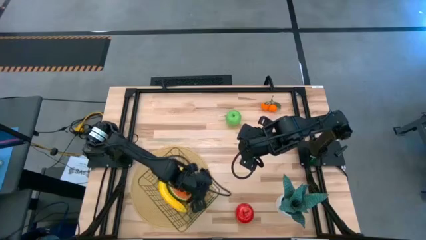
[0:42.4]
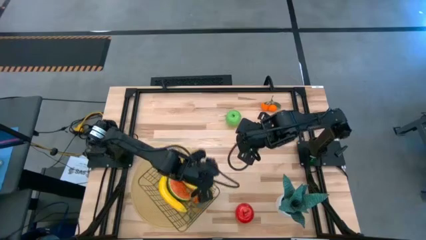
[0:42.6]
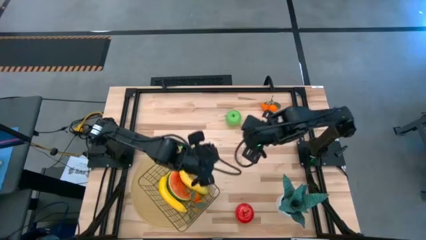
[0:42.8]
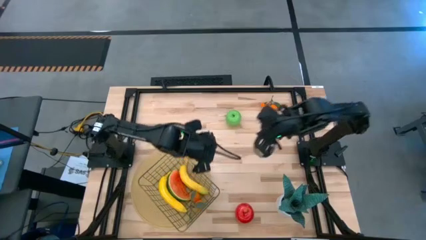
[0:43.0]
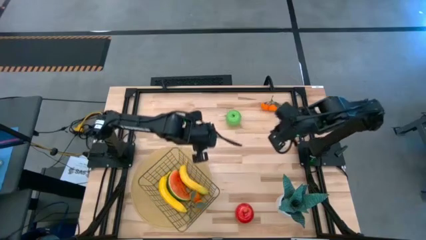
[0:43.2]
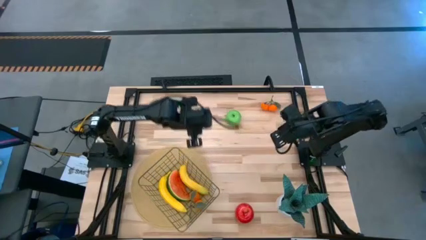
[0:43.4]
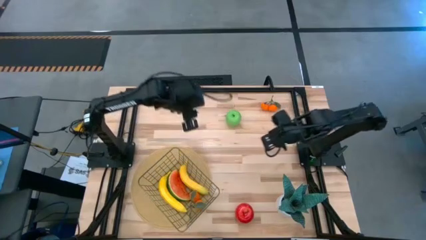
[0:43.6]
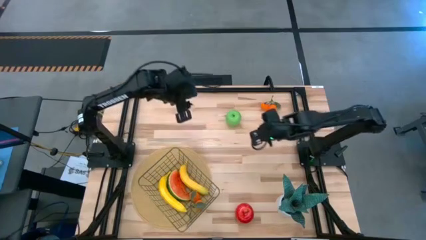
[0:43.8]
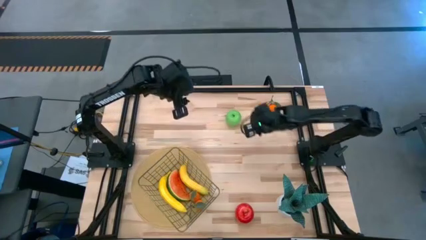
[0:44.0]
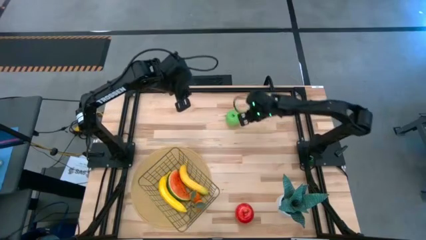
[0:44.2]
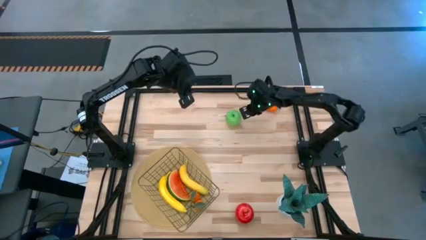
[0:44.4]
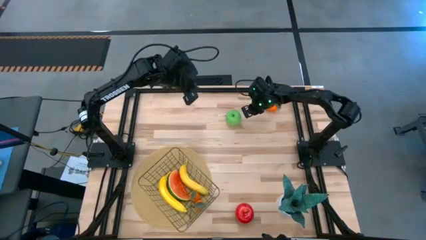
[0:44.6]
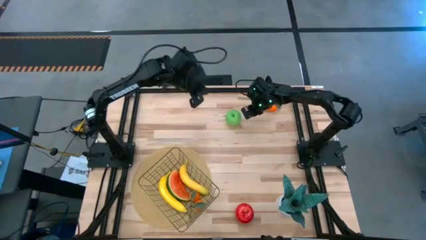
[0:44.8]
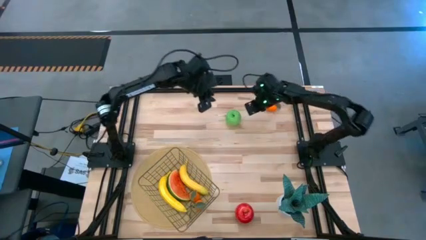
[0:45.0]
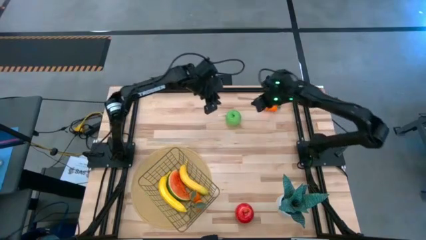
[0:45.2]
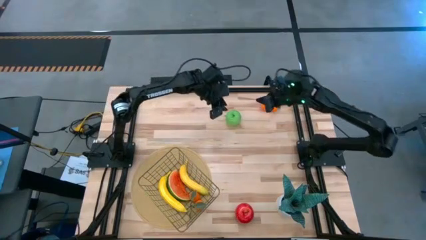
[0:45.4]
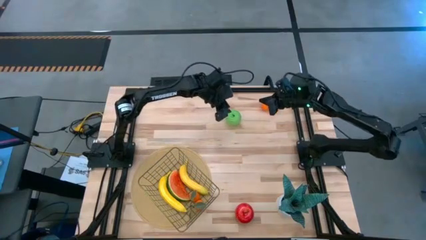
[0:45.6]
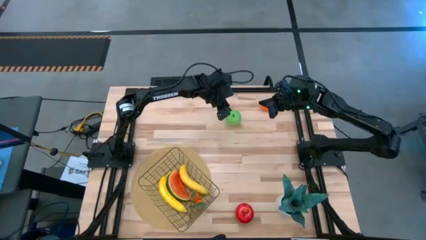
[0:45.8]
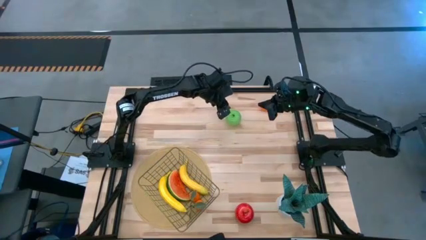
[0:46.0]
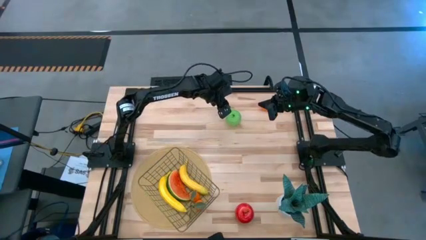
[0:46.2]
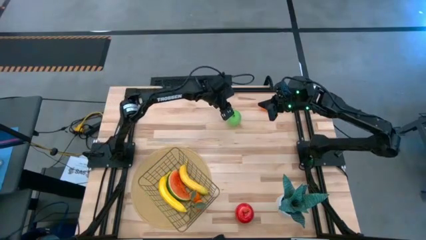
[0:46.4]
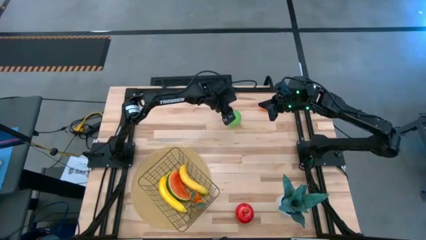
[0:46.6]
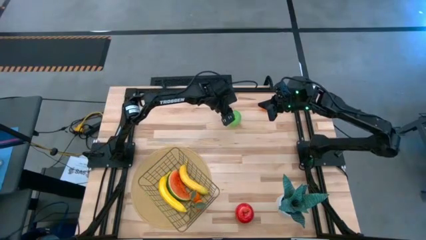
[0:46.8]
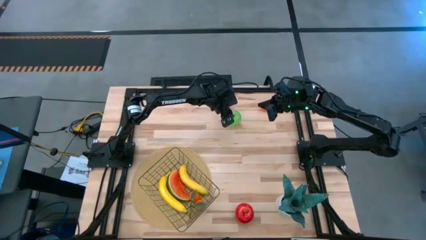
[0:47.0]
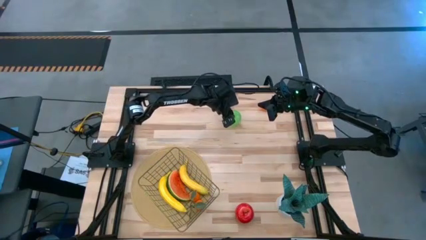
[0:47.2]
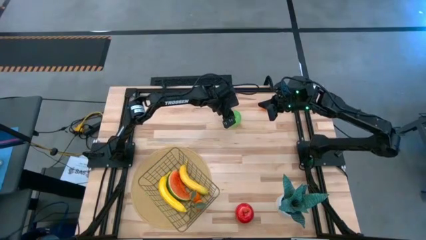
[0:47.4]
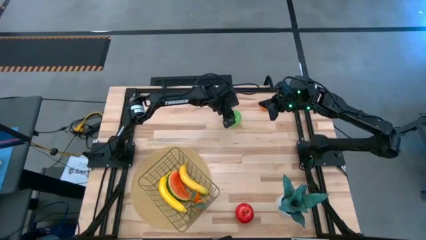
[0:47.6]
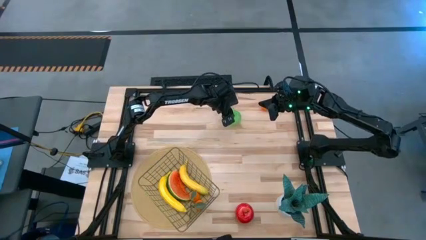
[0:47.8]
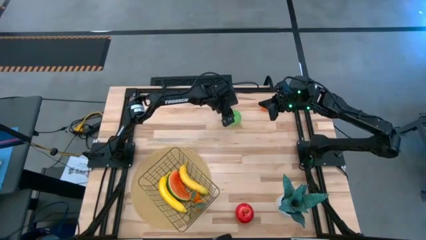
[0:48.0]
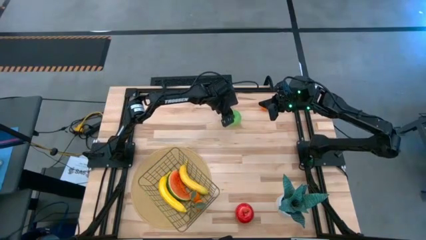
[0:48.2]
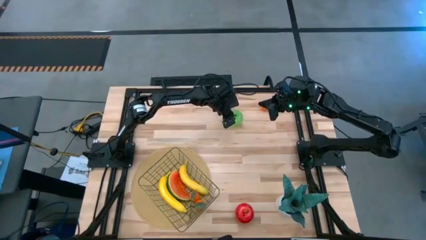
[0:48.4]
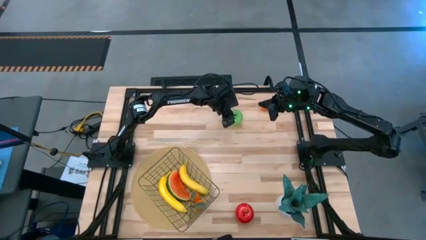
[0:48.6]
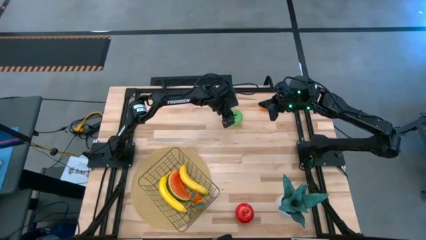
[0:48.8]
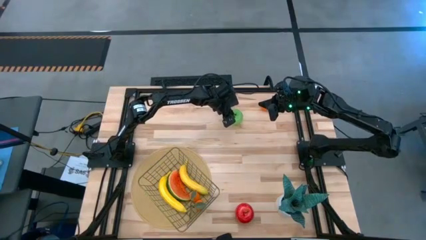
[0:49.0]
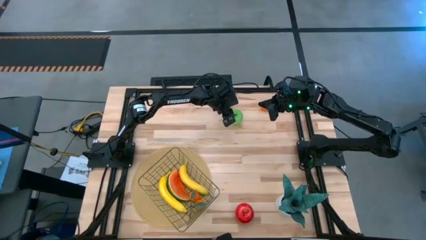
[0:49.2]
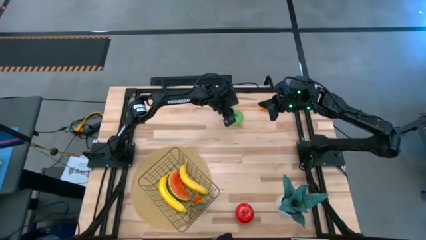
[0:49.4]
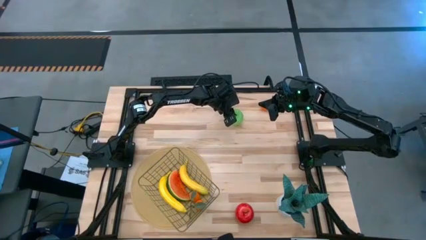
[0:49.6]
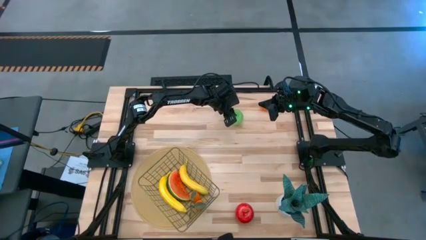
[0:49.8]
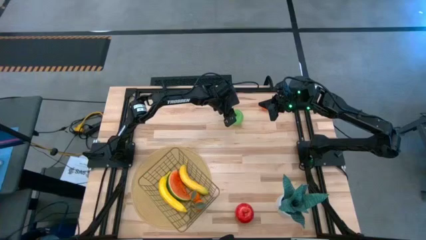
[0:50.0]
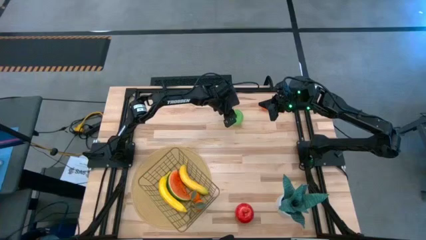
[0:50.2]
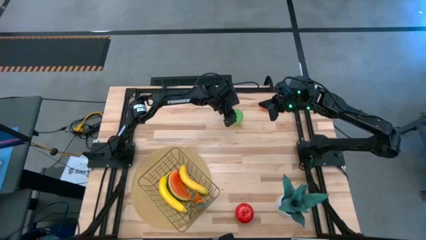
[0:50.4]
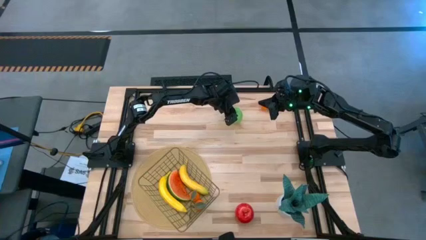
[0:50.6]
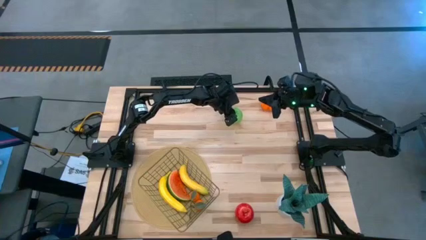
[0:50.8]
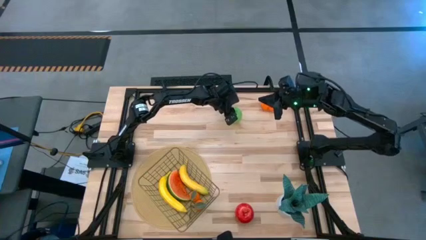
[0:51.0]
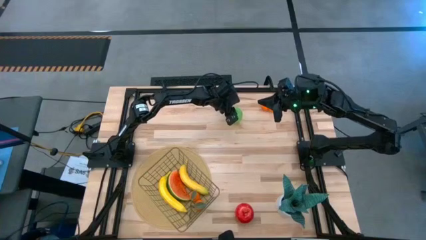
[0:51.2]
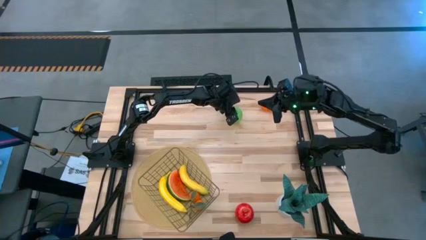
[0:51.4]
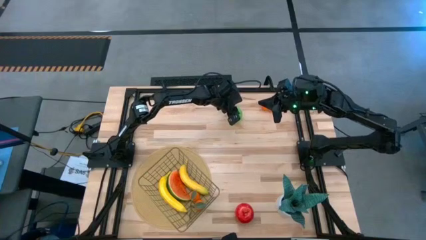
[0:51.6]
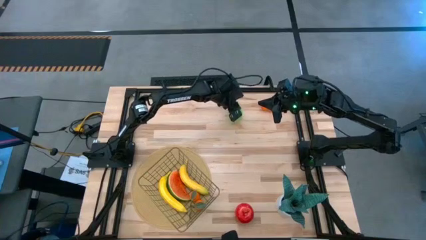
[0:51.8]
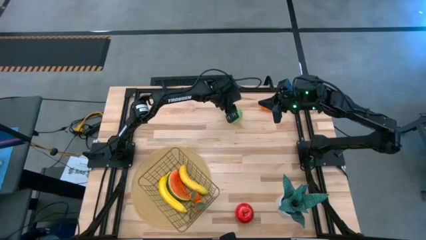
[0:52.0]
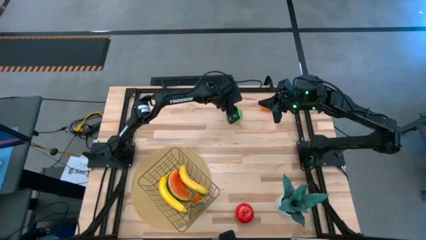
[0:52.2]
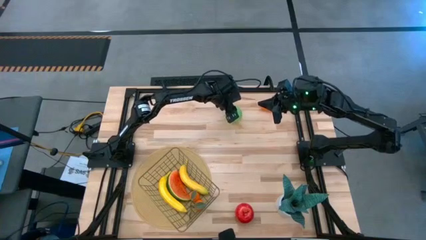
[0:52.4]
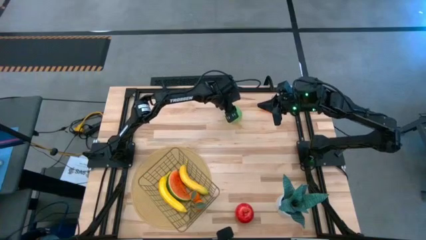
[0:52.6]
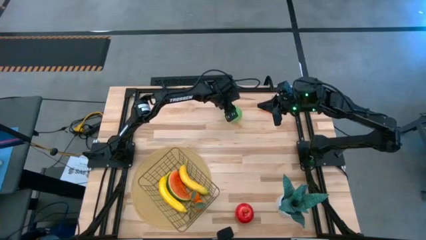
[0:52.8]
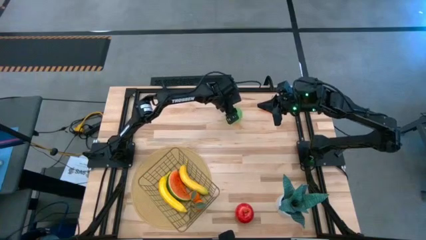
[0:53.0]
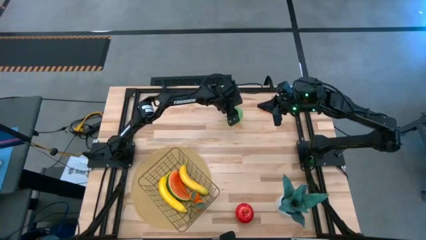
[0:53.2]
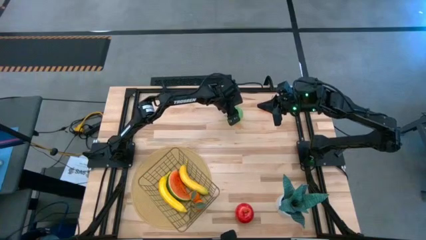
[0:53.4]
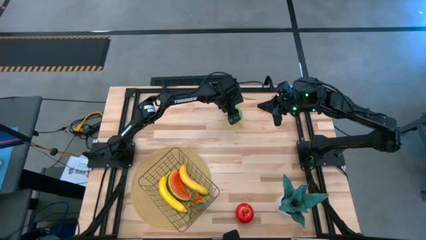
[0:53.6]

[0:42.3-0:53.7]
Task: Build produce basket
Put the green apple into the gold wire basket

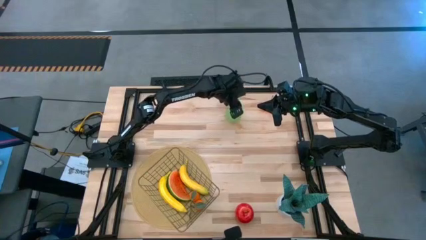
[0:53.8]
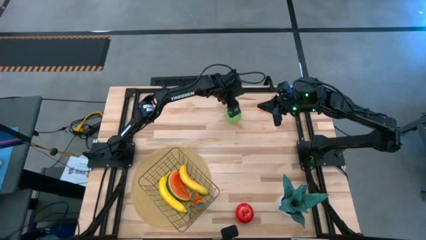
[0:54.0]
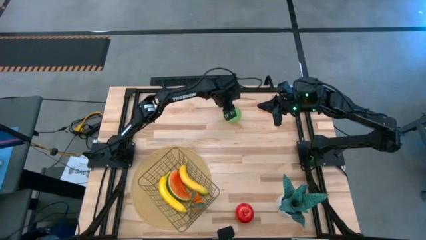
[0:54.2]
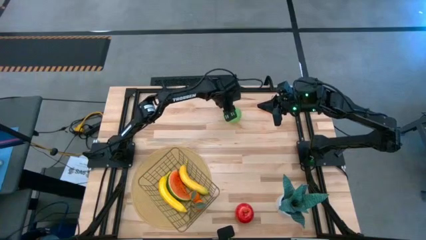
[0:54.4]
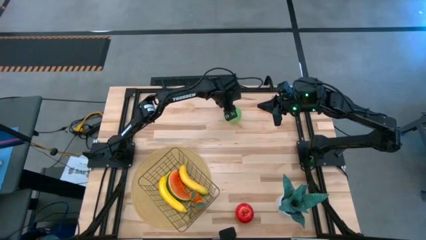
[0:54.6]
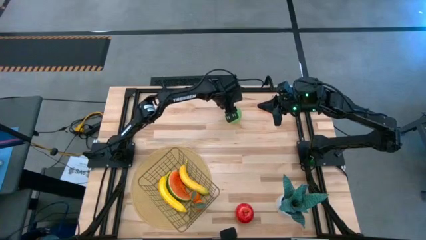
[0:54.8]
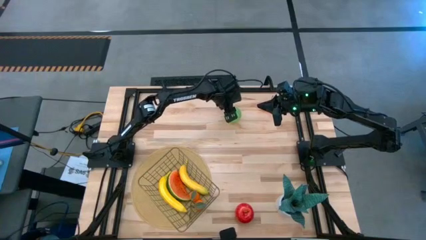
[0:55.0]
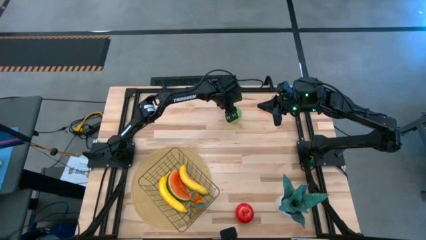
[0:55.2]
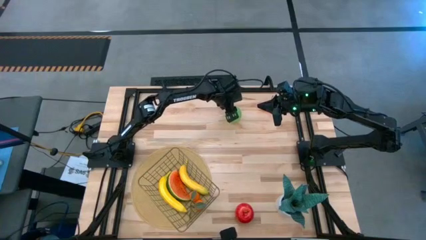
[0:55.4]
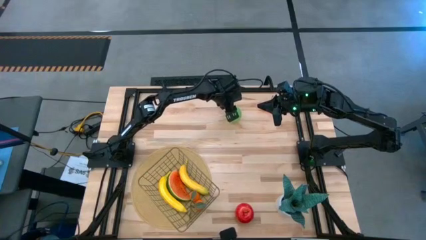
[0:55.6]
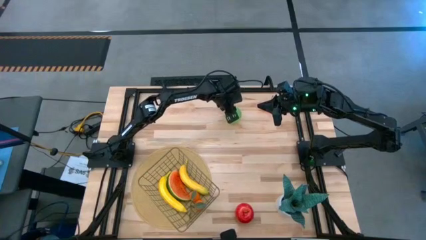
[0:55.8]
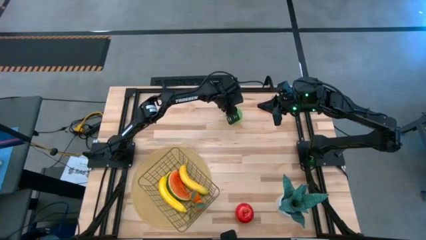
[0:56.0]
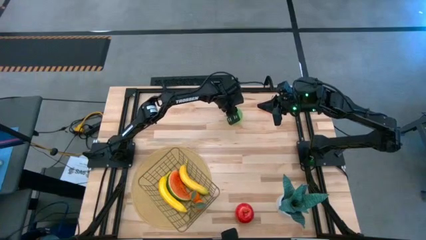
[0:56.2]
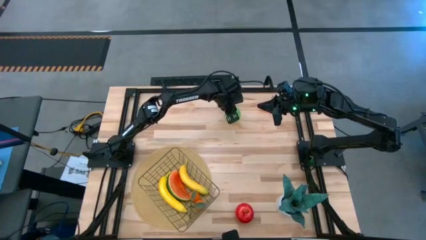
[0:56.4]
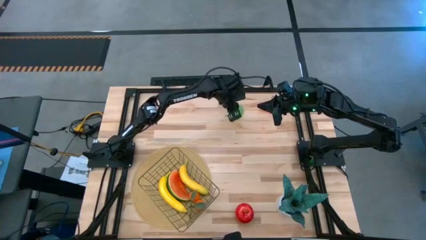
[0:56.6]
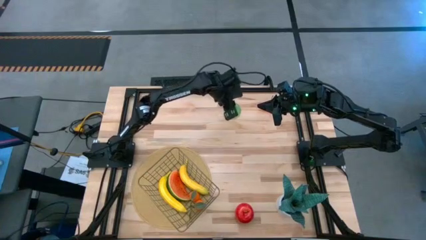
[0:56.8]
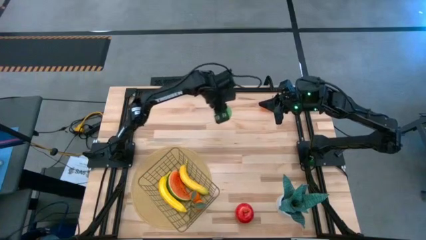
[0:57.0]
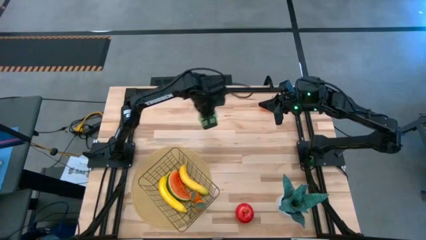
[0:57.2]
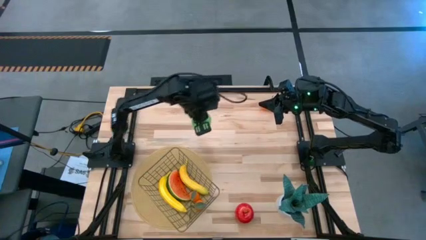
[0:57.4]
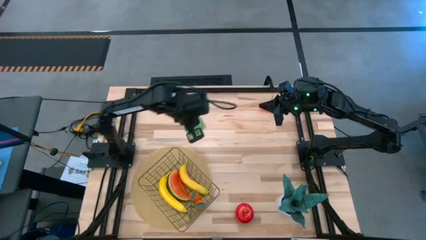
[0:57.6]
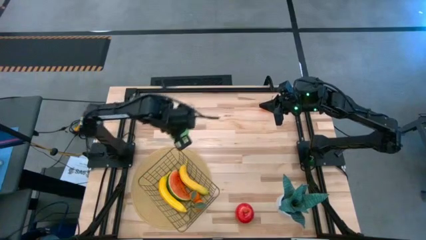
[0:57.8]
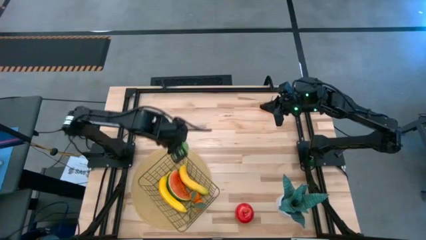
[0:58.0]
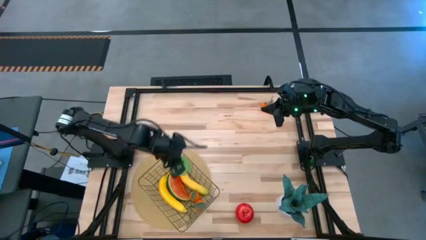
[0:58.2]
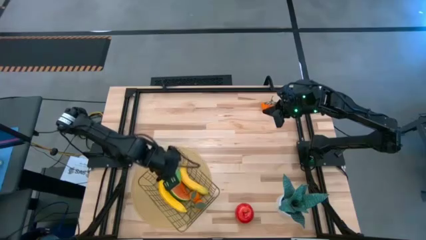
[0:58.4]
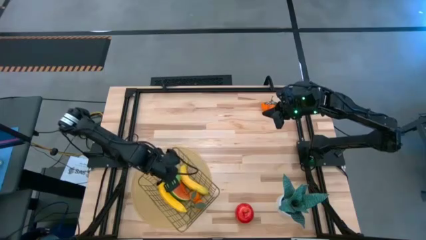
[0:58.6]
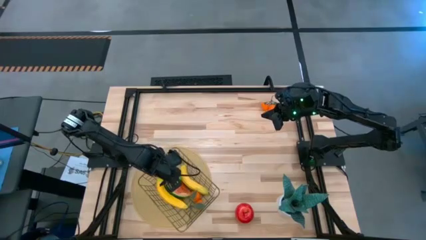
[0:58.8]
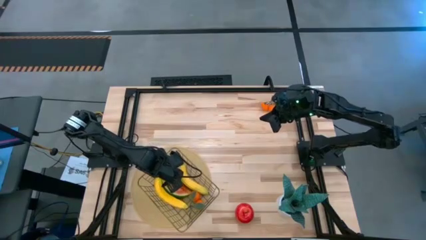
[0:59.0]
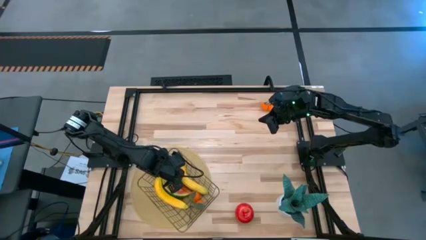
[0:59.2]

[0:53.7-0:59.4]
Put the green apple into the gold wire basket
